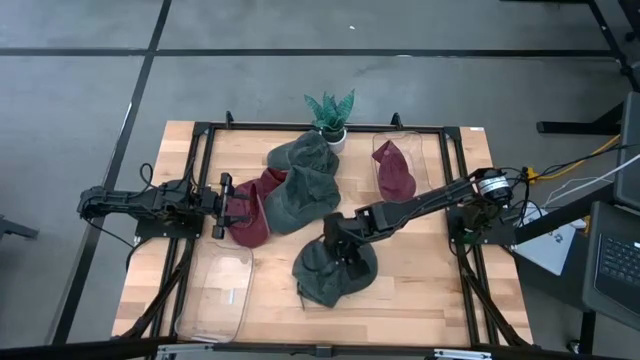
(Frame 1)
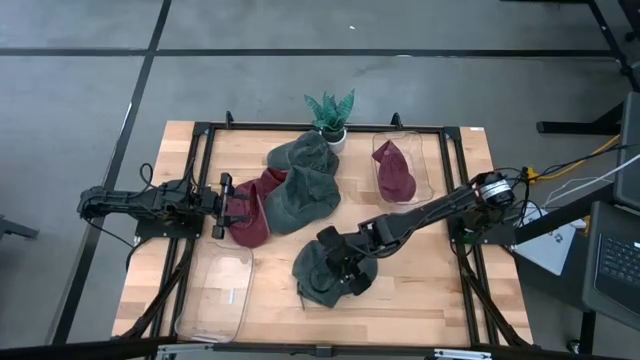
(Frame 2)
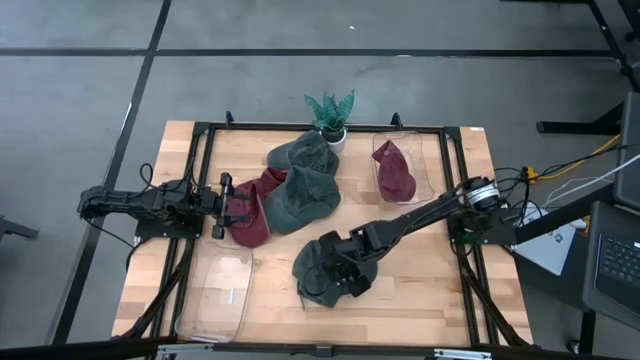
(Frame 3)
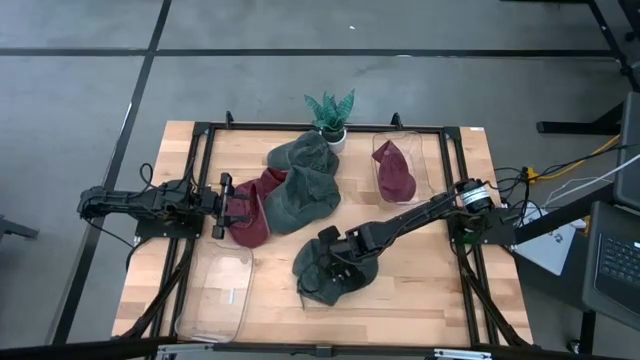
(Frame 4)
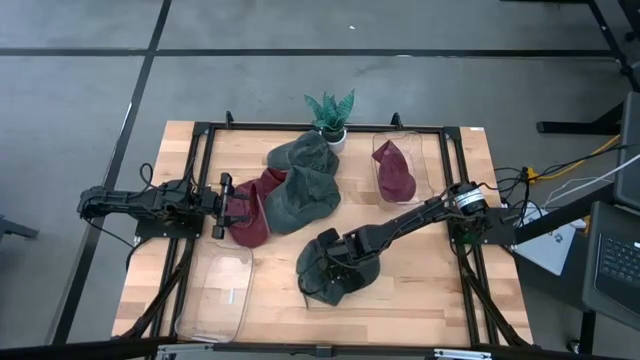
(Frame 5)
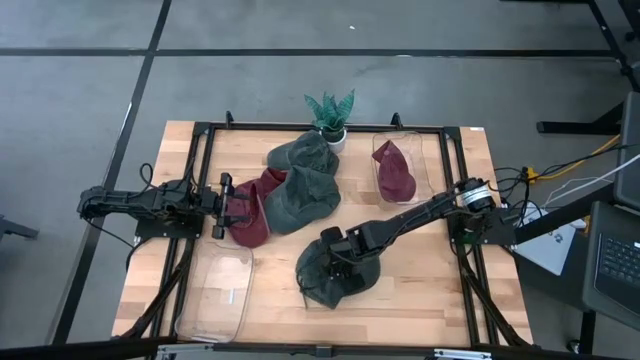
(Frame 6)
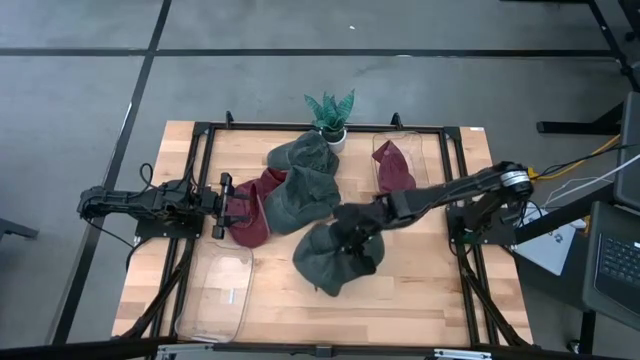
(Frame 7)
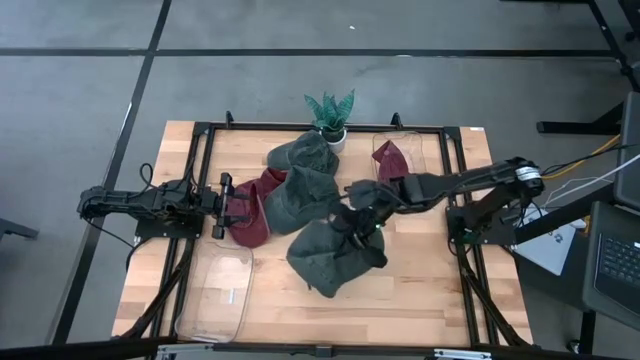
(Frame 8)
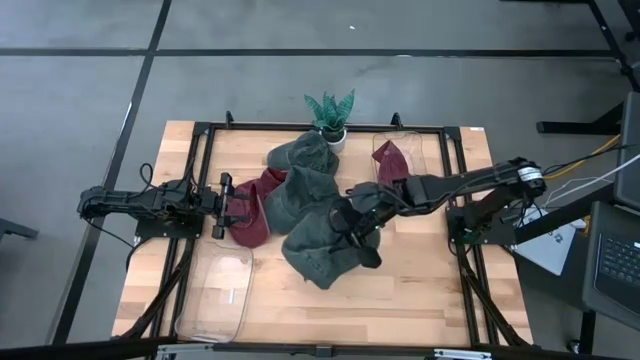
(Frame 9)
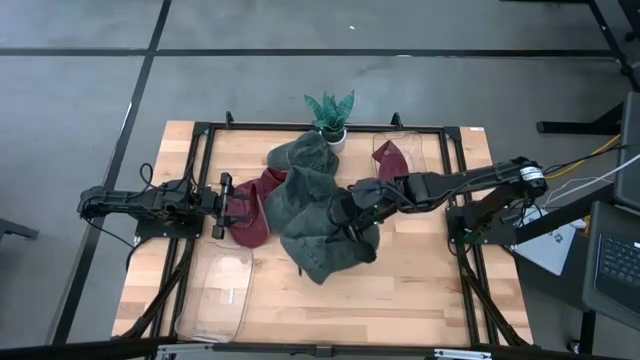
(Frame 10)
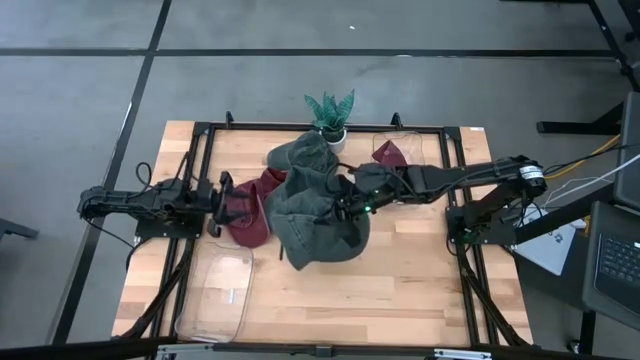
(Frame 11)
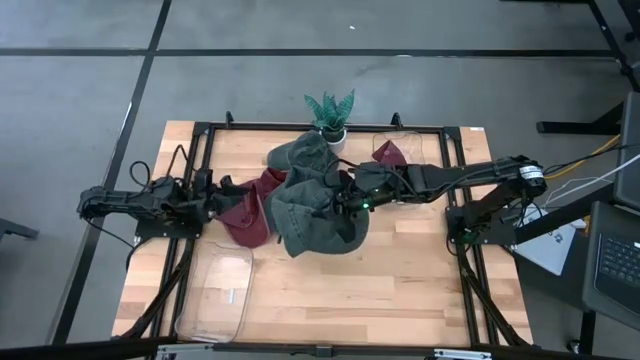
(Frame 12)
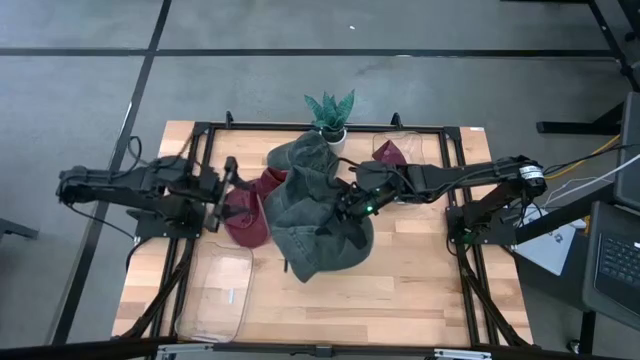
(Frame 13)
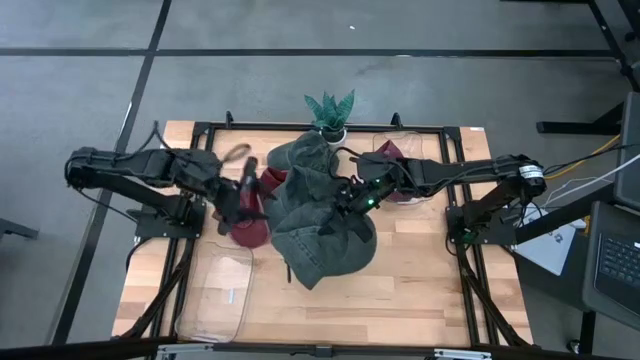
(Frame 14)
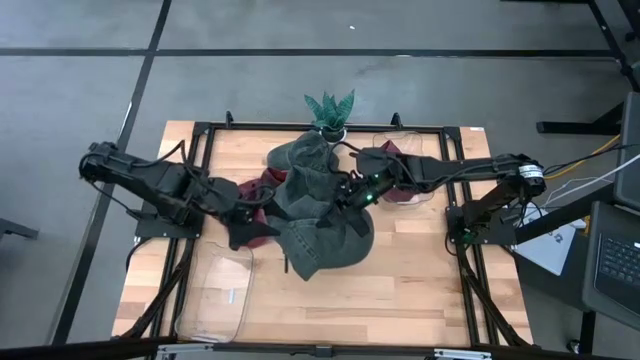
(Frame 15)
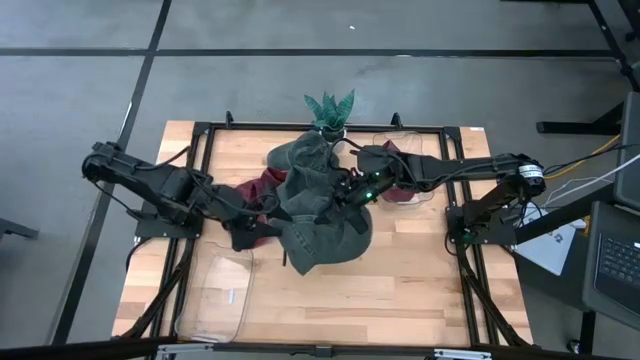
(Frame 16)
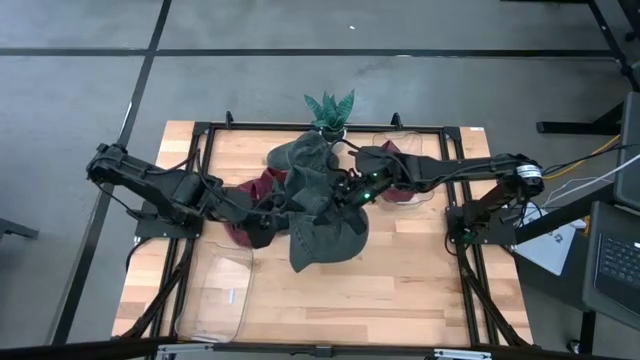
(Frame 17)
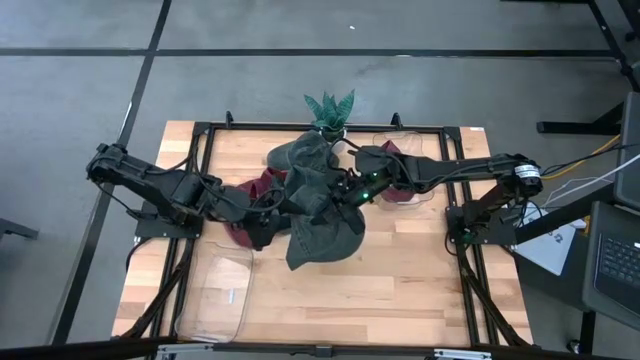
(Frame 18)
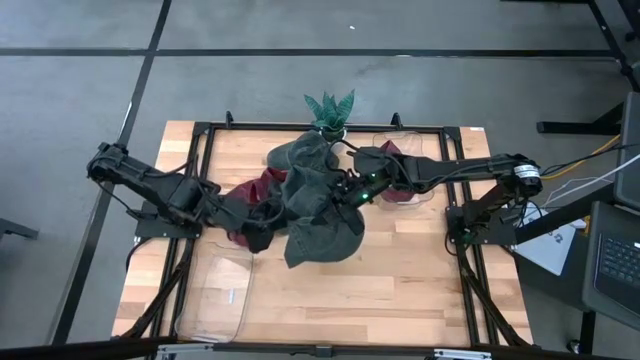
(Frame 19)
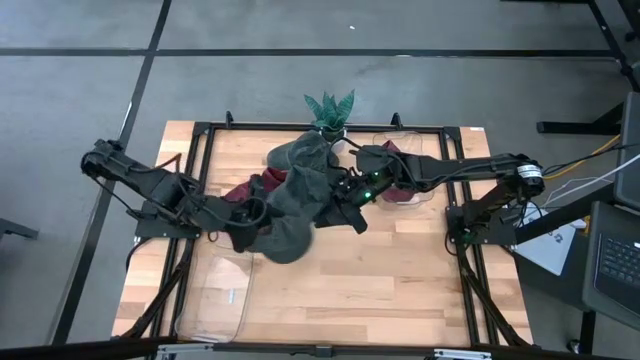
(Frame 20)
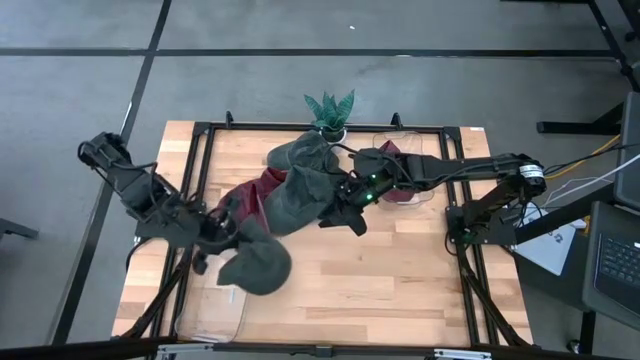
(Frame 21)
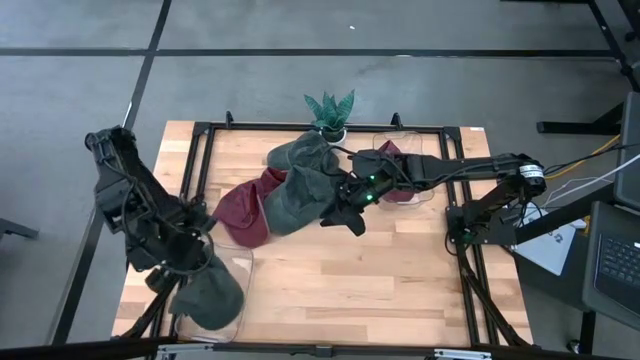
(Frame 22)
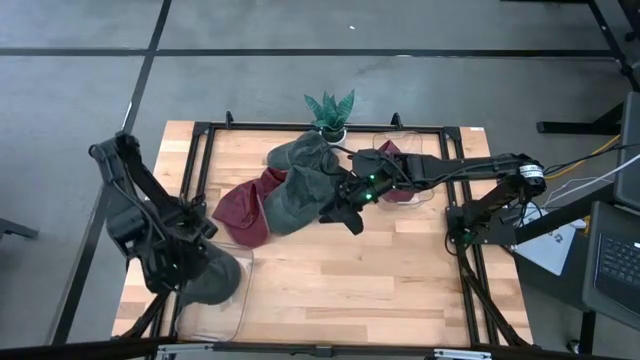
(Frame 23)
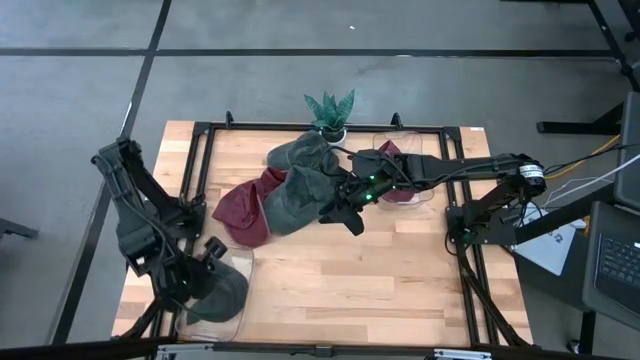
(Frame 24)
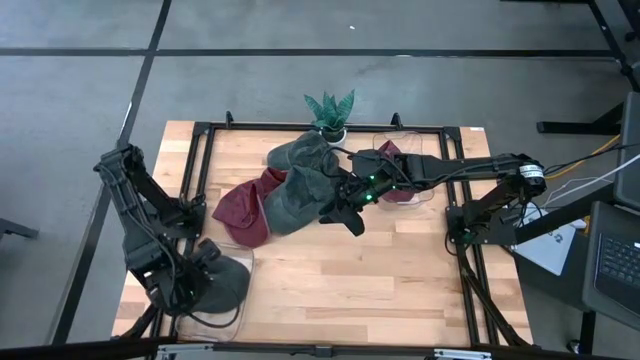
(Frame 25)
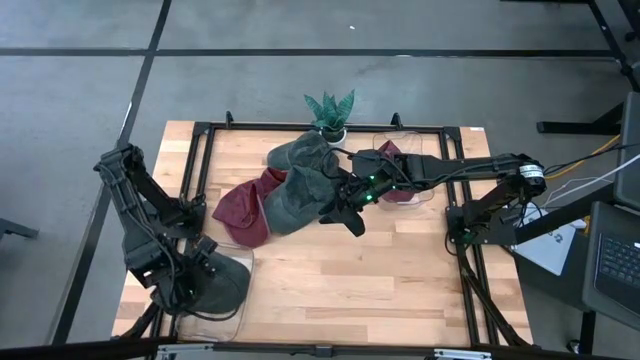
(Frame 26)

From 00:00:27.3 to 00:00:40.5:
Task: Pick & Place hat
Put the bottom gray cap into the bottom left transparent bin

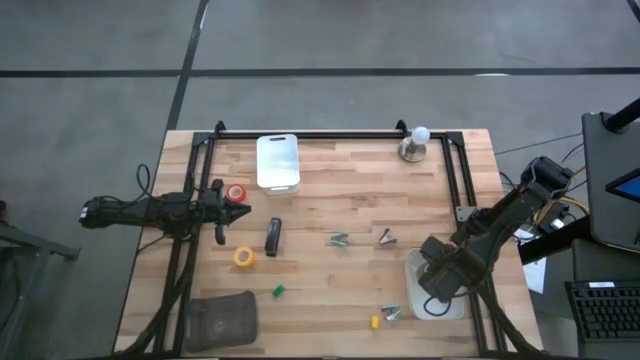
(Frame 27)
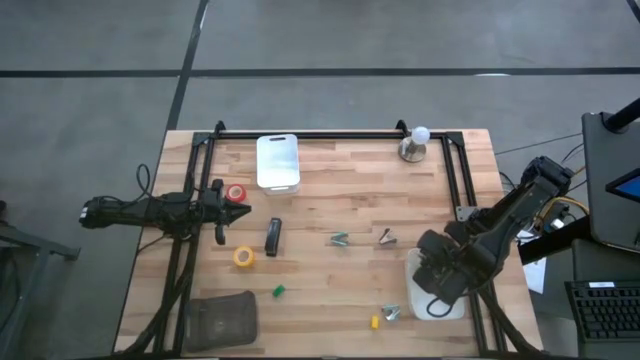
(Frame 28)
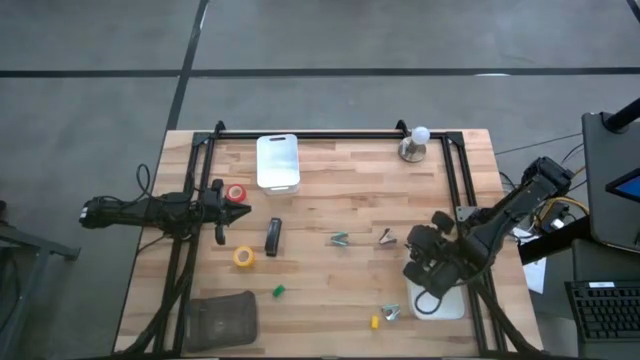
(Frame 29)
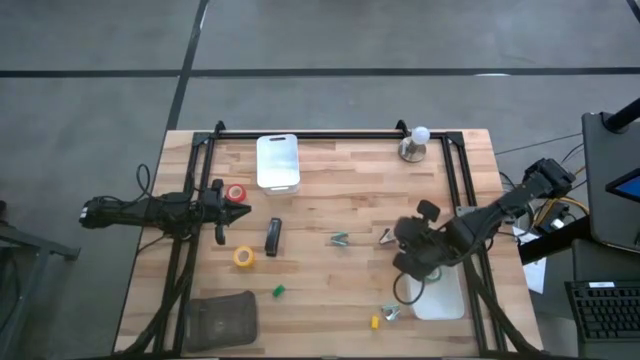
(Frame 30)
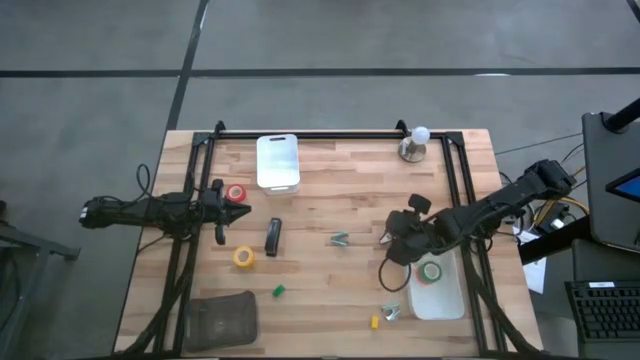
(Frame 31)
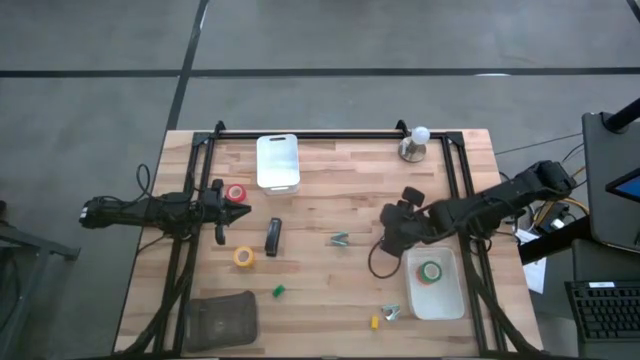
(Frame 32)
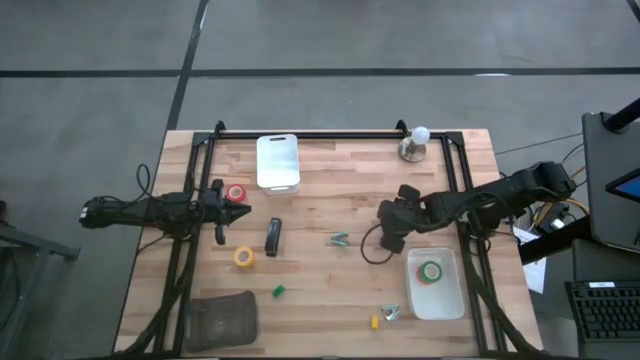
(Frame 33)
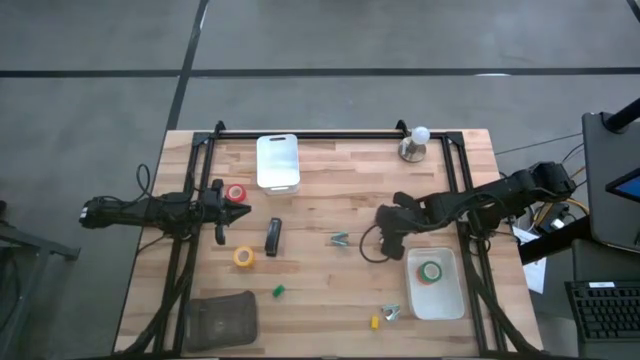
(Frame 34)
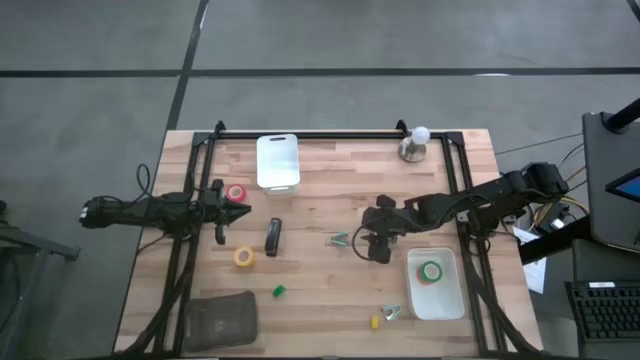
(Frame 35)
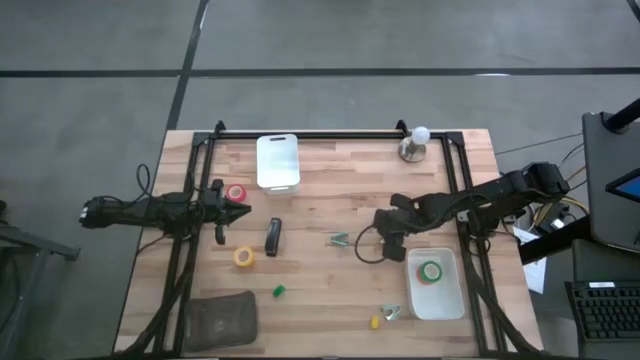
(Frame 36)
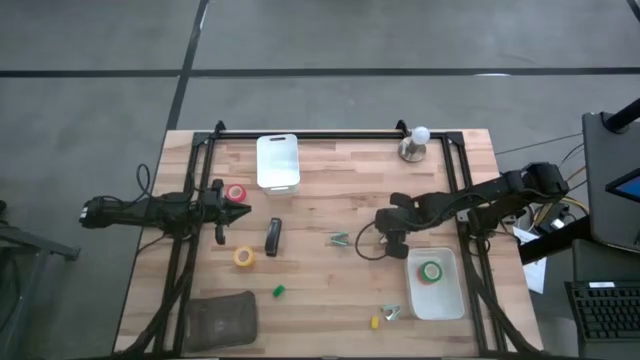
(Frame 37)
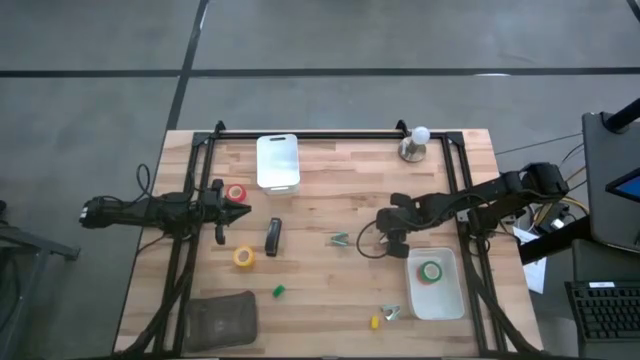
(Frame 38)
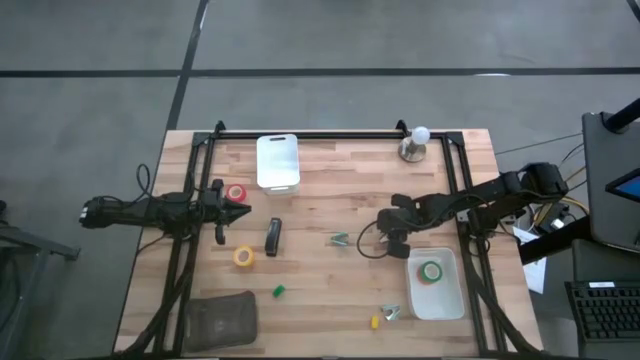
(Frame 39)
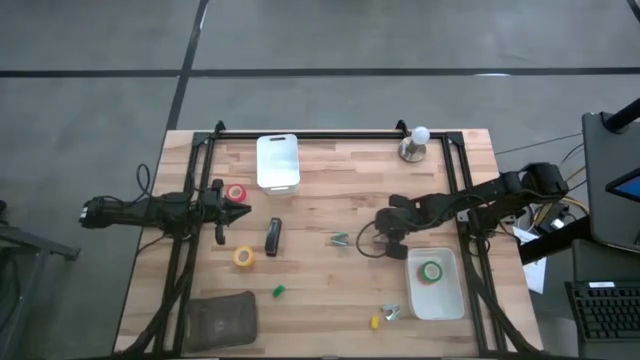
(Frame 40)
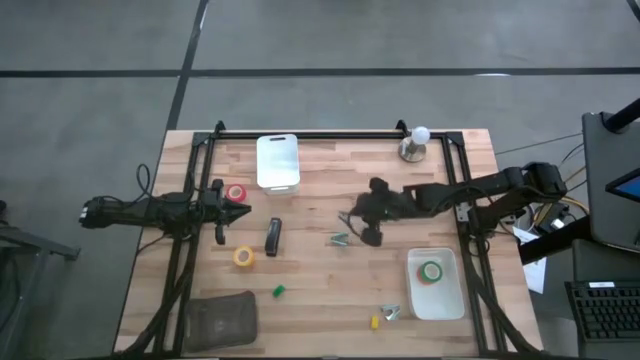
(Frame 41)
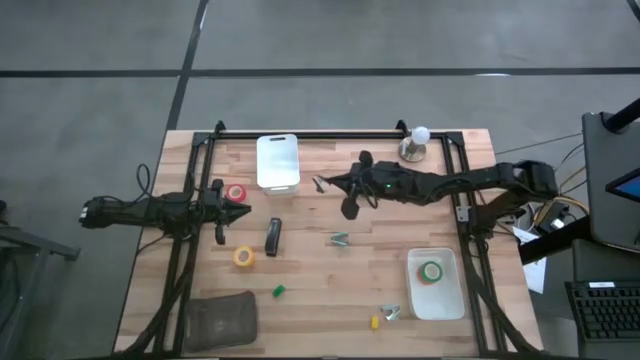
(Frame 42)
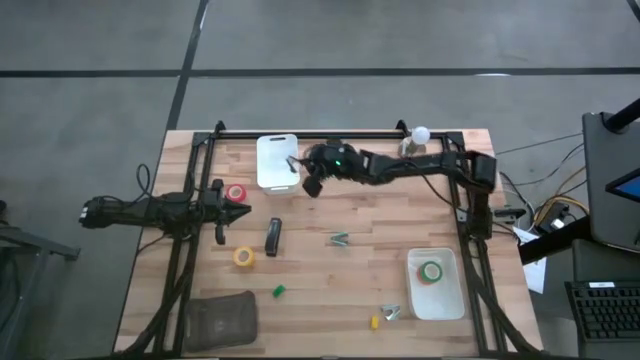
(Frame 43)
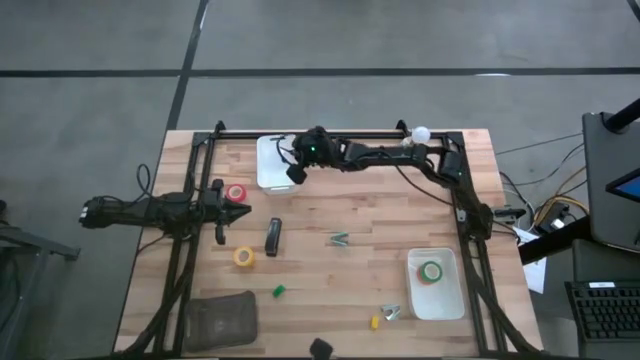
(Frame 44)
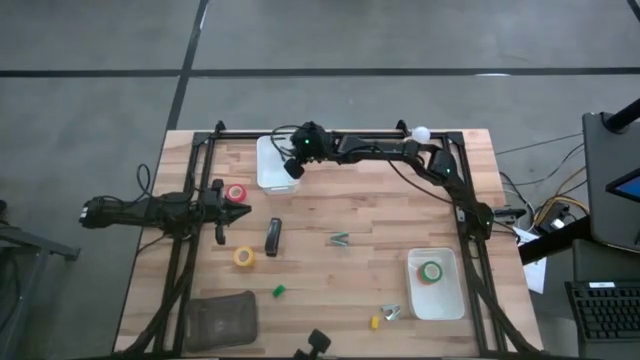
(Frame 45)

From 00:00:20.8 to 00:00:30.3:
Task: Pick and place Stapler, Stapler remover, tape
Put the black staple remover into the top white bin
